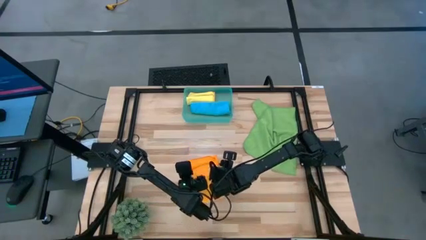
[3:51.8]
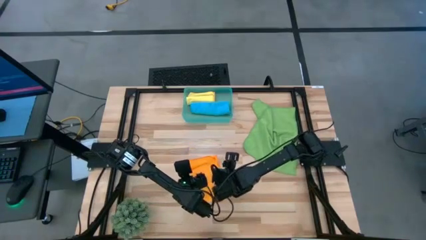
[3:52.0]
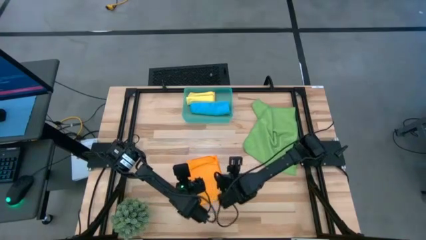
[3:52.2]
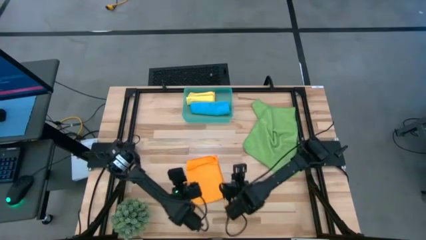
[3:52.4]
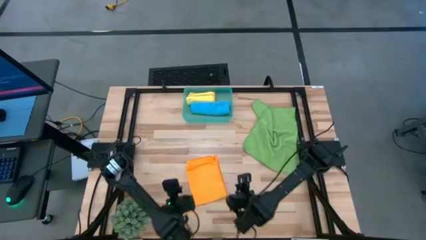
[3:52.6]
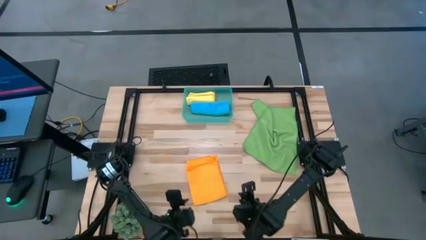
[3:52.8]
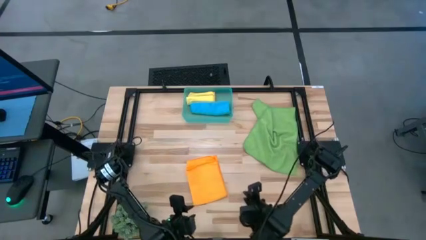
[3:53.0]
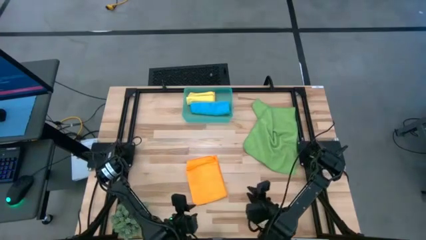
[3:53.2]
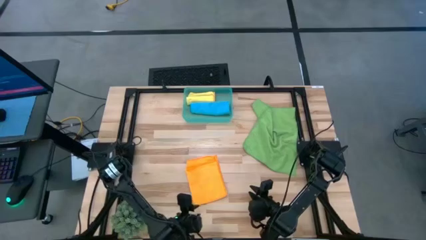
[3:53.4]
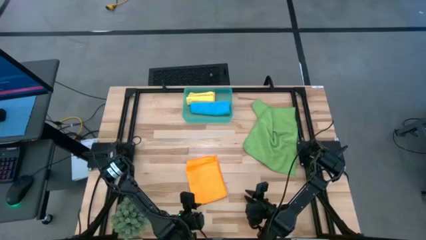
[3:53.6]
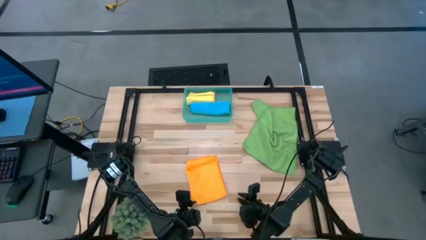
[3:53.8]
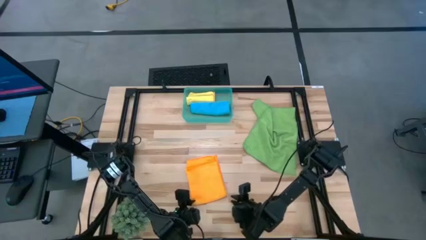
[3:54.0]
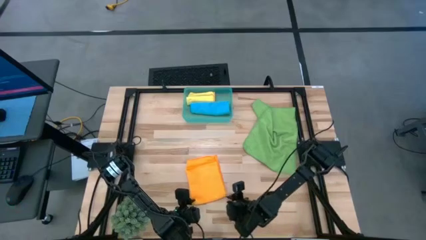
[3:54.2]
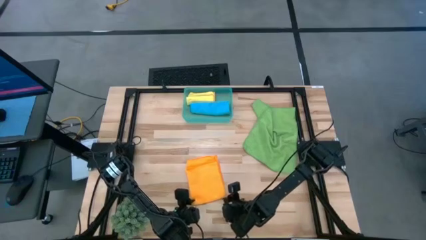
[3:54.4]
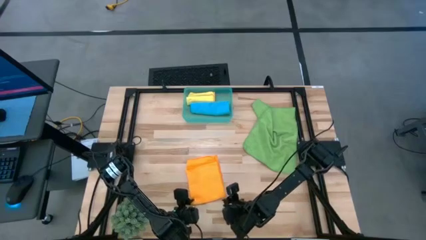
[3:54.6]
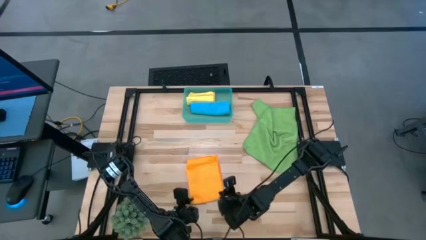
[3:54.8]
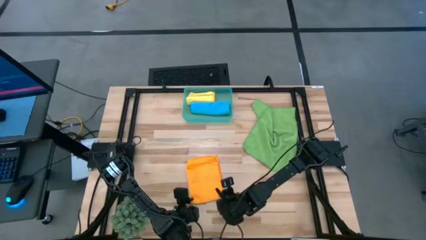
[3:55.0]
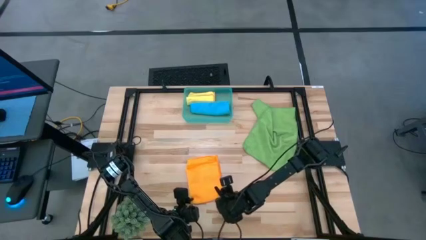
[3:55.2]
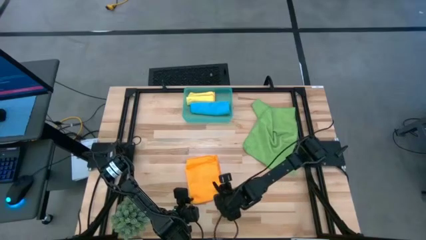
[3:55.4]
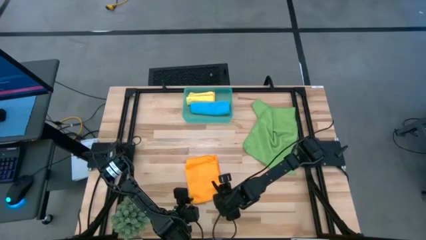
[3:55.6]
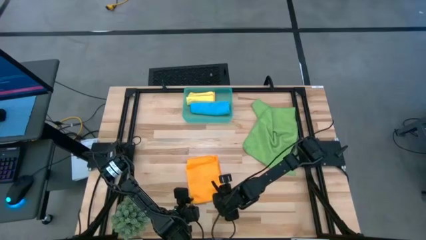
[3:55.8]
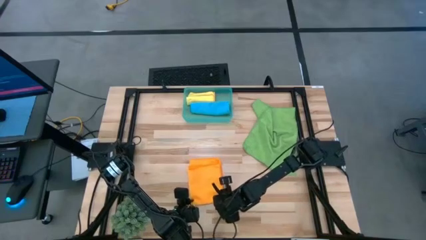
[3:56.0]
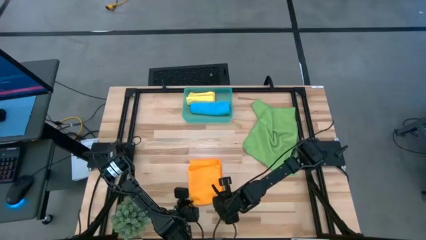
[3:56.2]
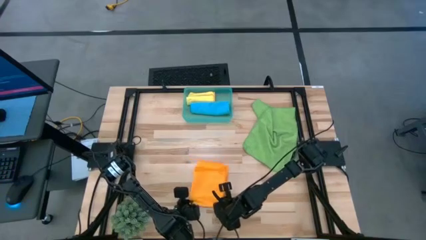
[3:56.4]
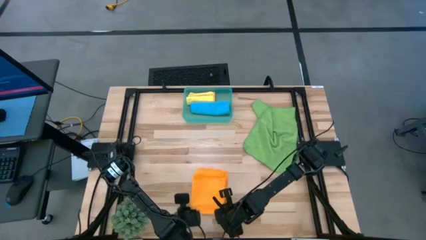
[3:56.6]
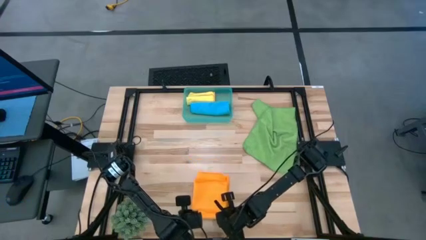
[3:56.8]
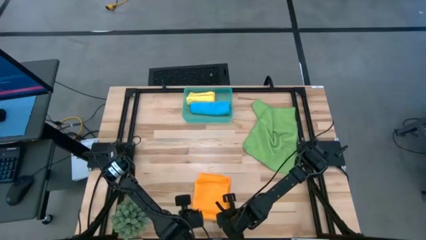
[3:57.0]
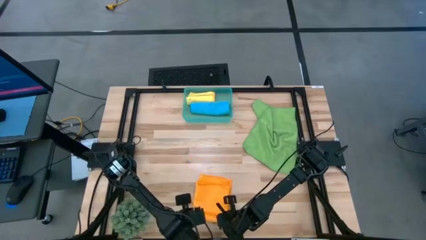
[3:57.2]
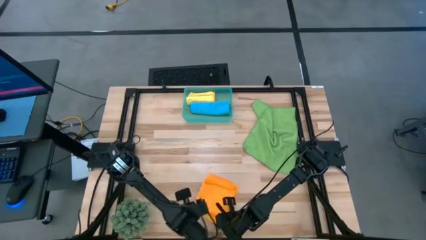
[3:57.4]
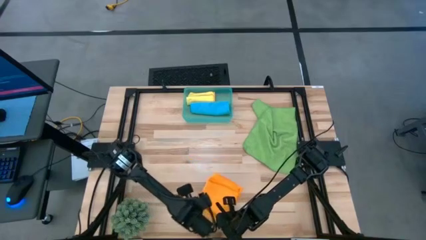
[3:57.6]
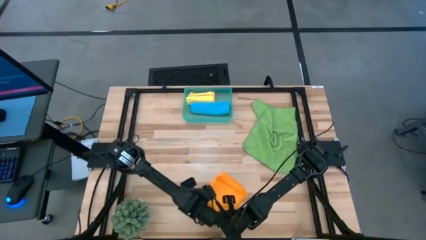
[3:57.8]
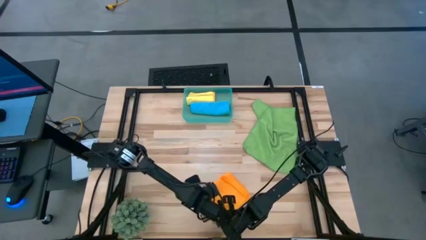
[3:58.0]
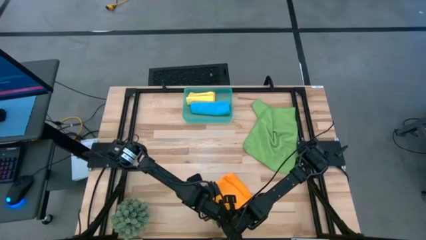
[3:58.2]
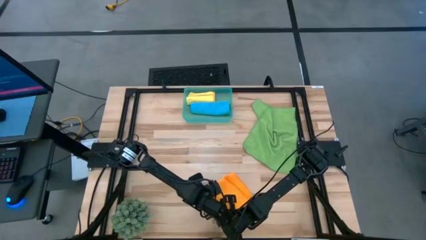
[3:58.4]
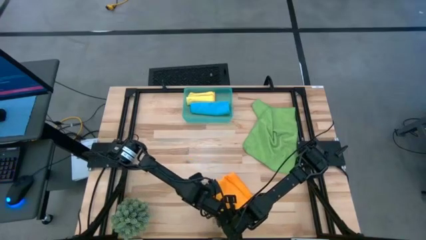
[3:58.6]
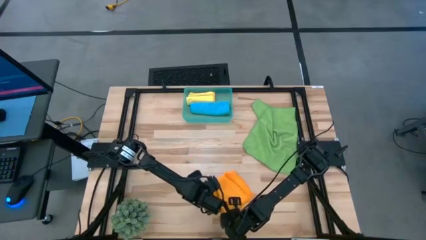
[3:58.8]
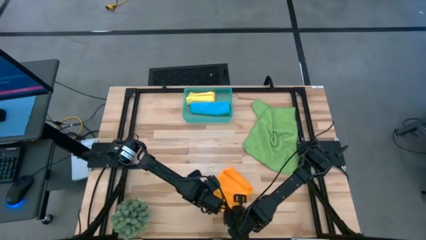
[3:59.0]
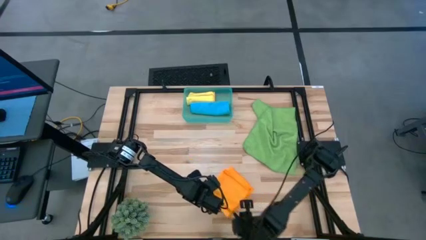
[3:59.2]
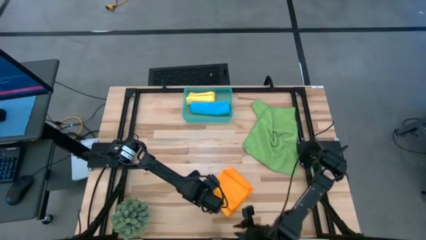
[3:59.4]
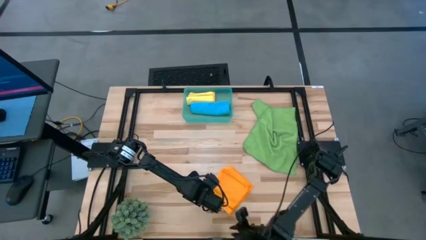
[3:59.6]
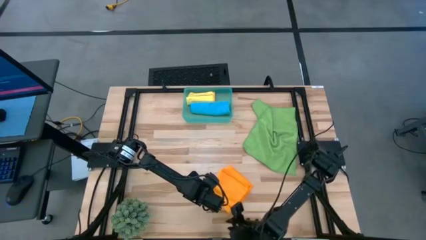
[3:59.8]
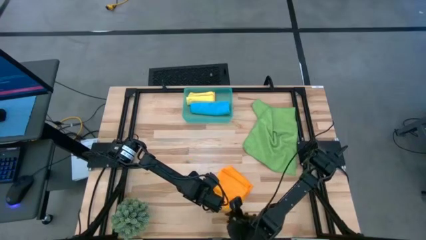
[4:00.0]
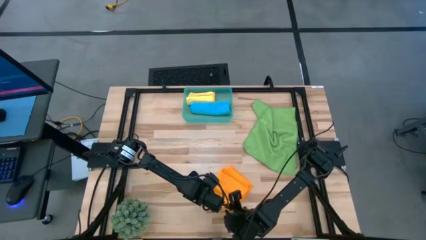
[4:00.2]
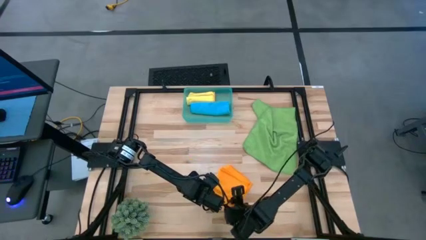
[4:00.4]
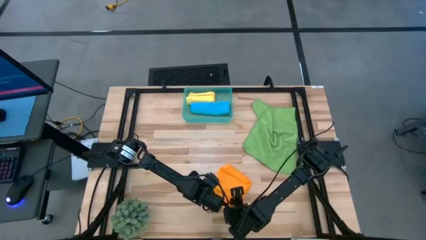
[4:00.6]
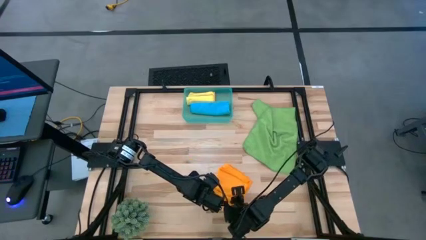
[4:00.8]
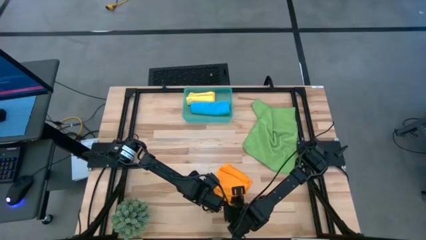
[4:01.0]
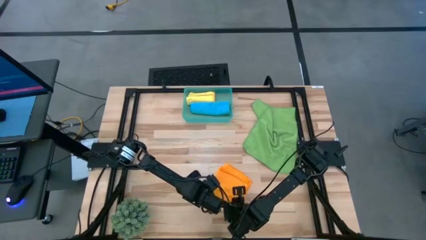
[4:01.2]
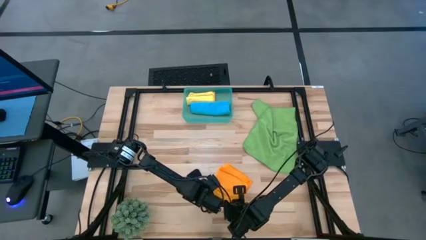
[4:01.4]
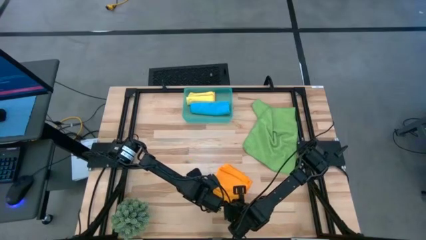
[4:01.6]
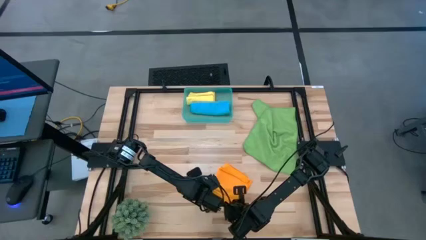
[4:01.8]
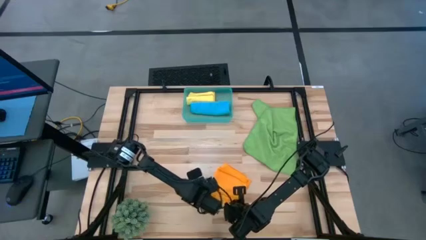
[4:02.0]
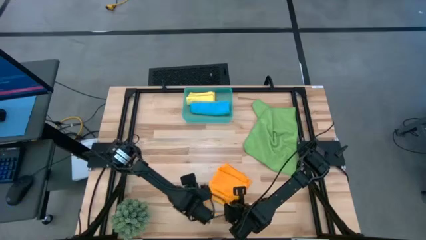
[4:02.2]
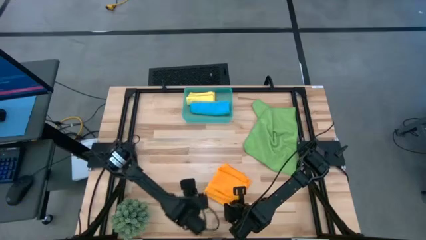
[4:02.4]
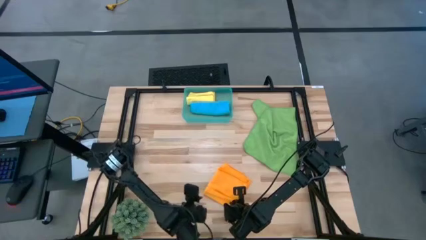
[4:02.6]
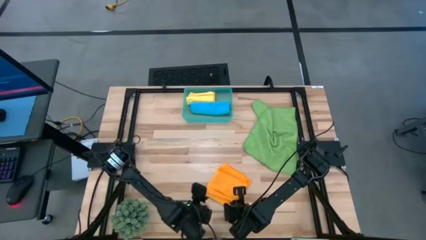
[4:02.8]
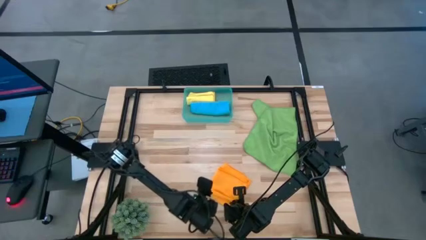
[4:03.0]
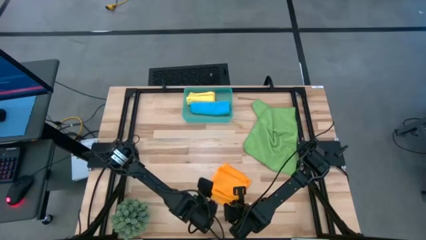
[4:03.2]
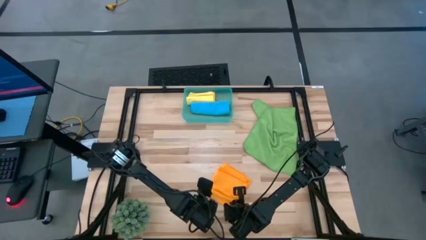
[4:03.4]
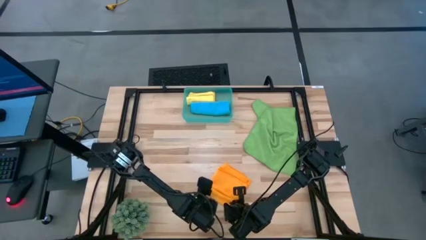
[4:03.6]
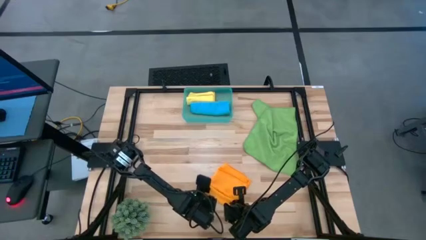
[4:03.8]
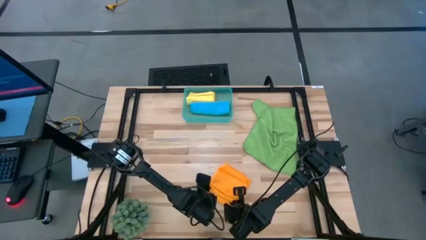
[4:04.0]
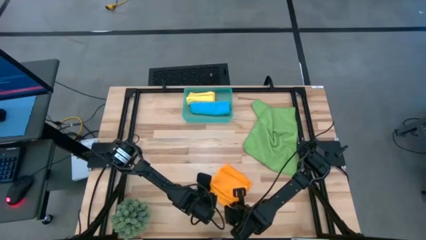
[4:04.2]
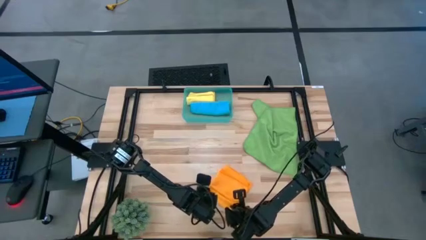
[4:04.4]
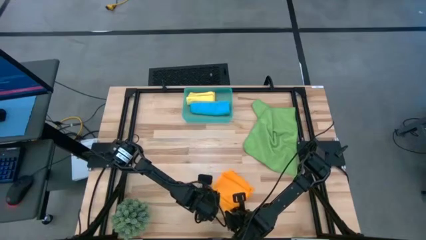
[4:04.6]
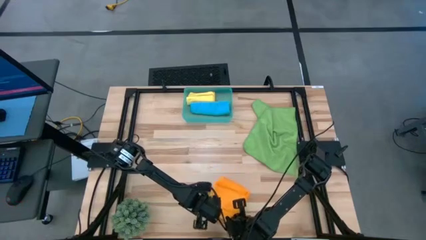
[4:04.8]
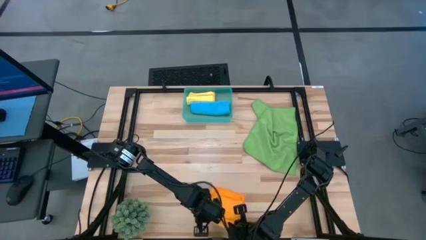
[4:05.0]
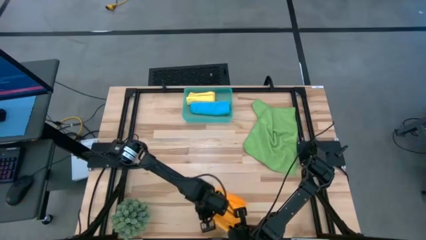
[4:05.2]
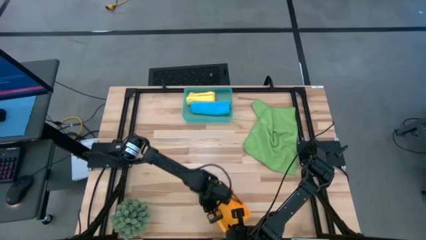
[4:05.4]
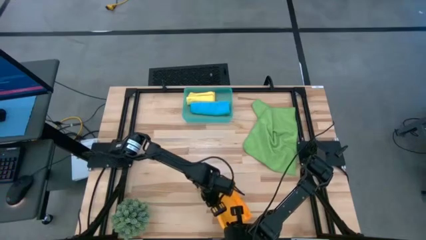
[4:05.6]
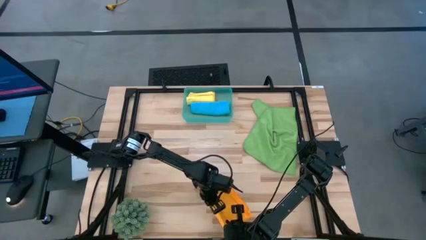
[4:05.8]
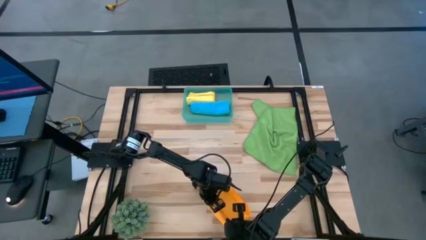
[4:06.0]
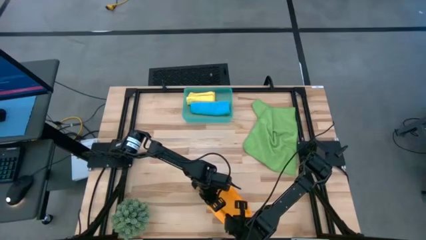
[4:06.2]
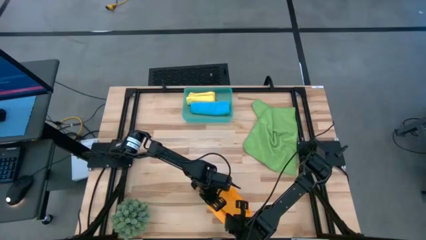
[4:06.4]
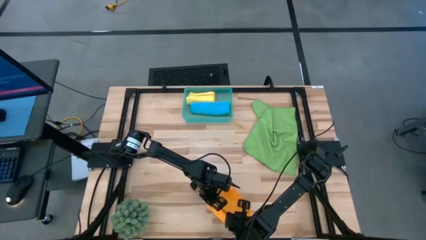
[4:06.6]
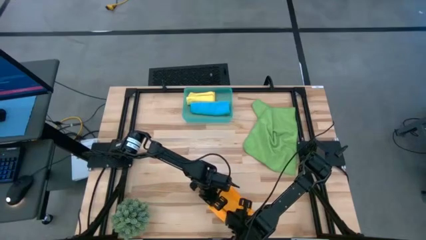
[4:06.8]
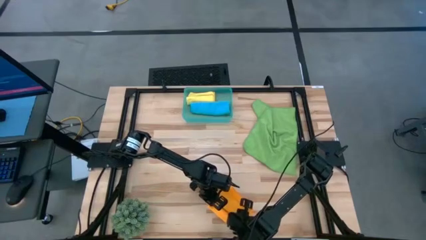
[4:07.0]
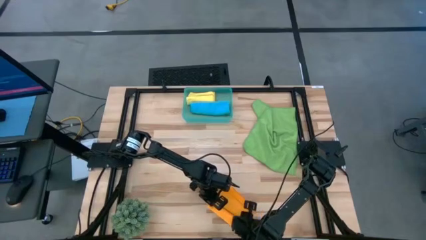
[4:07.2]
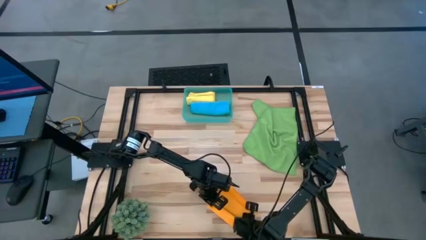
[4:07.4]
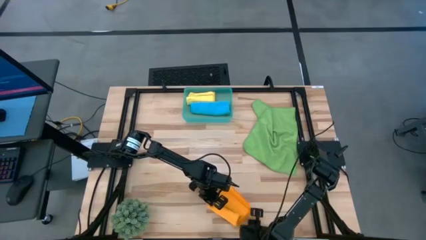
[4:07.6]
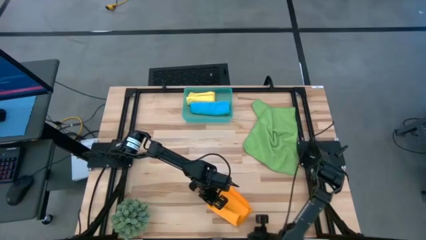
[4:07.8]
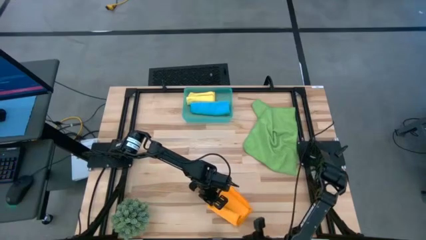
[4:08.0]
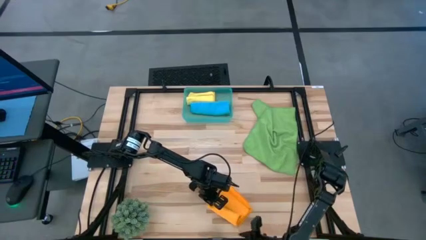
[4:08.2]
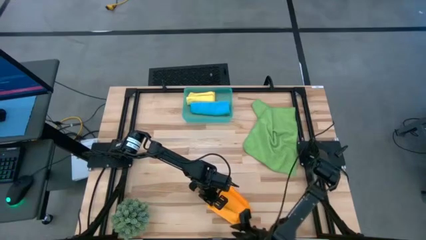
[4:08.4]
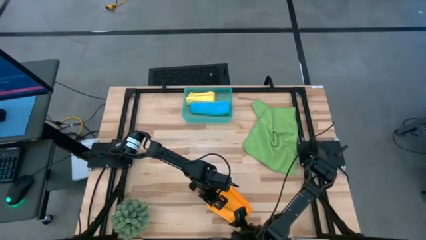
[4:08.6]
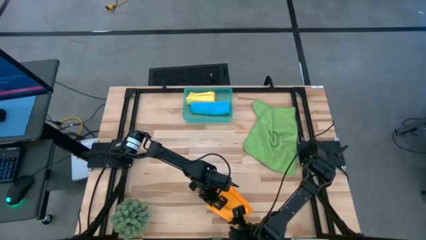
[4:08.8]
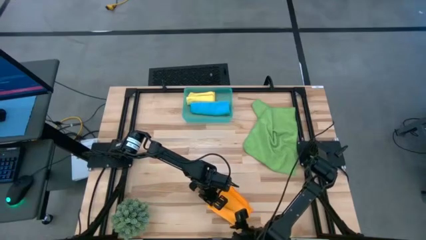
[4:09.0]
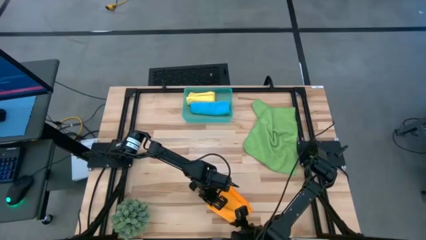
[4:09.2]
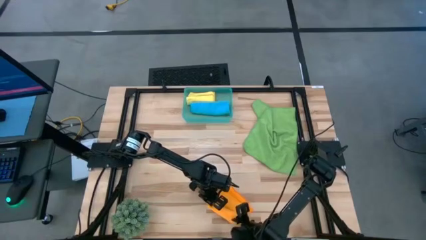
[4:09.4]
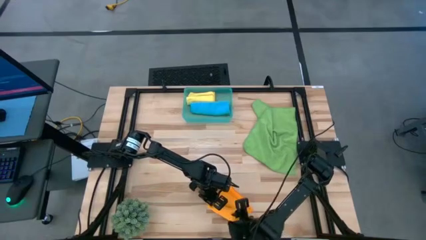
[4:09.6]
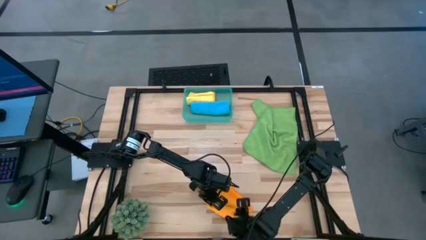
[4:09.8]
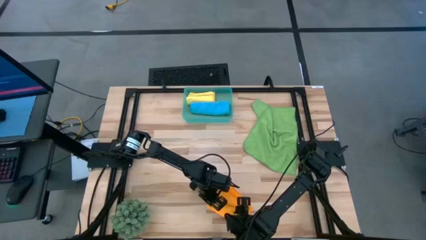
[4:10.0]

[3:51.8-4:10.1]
Task: Roll microfiber towels into tight, uniform cylinder then place into a basket
Roll the orange microfiber towel
